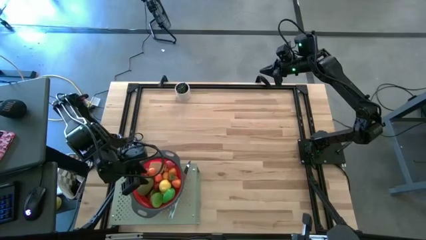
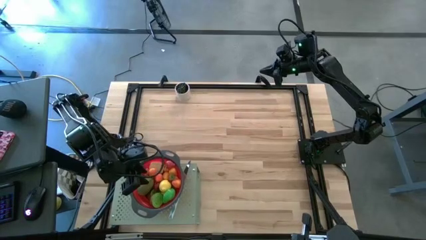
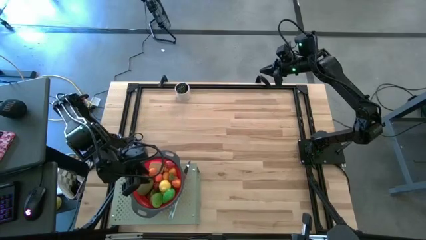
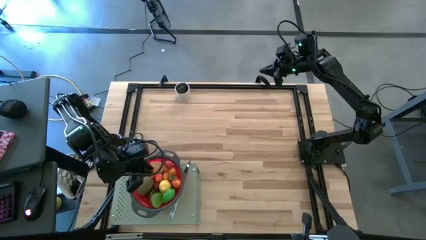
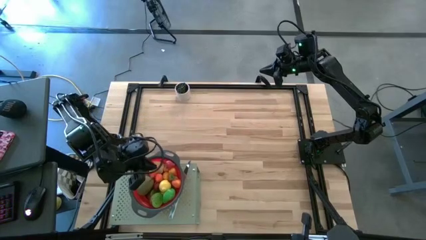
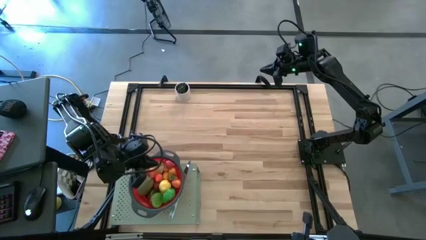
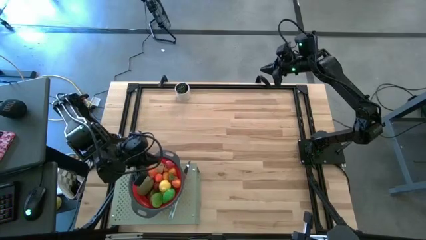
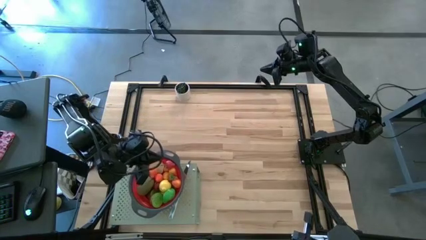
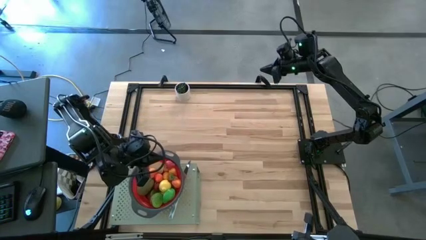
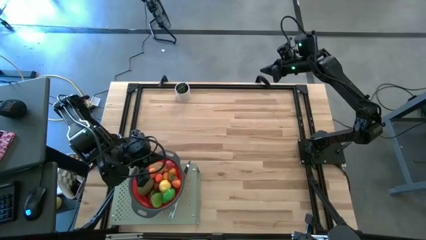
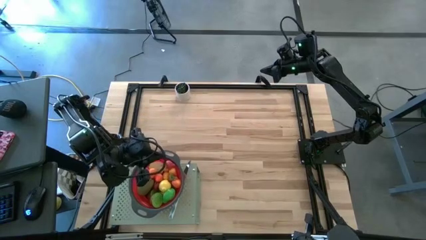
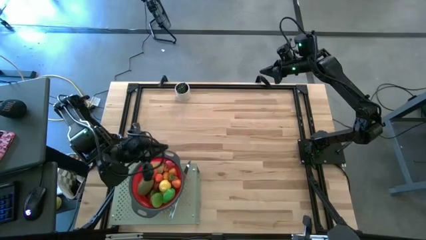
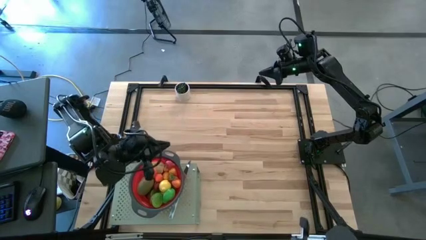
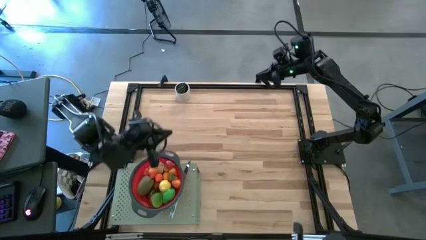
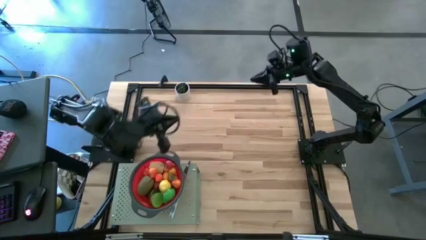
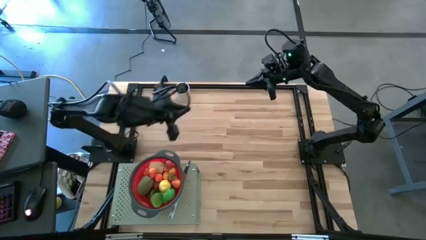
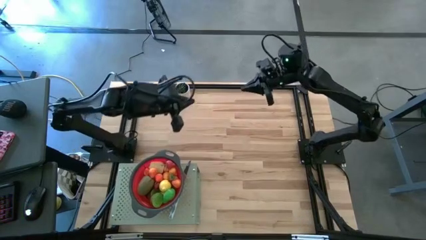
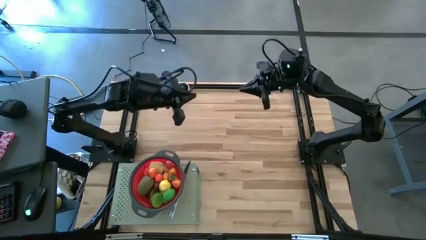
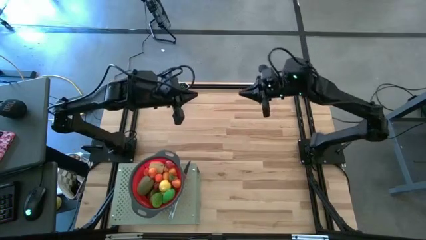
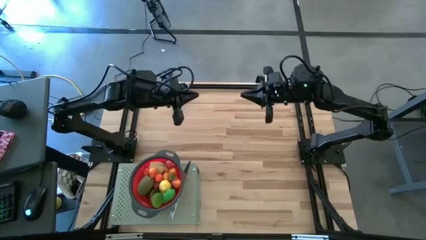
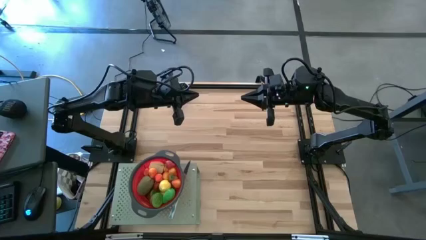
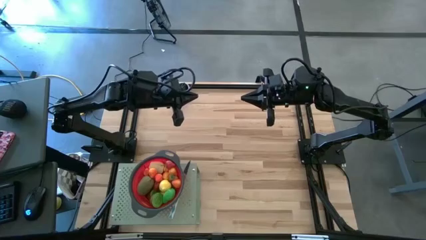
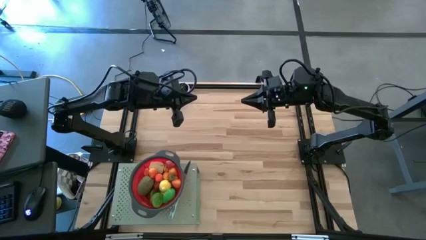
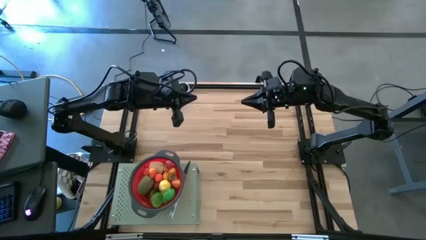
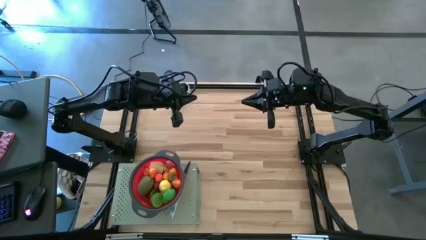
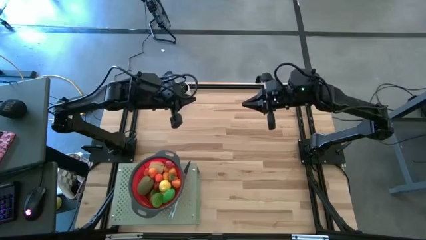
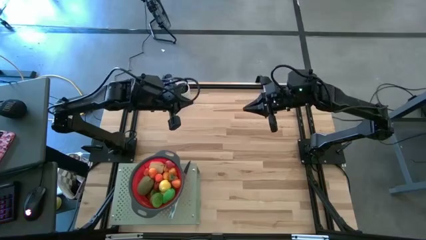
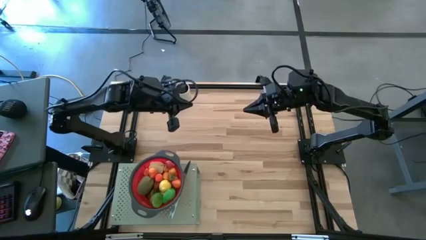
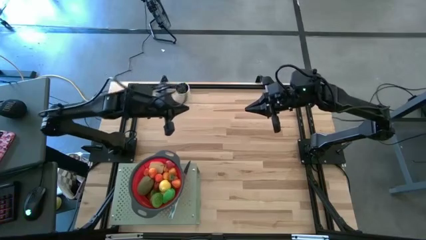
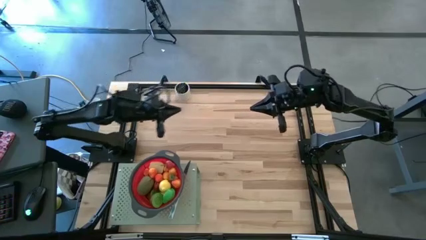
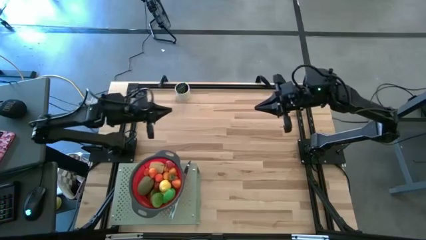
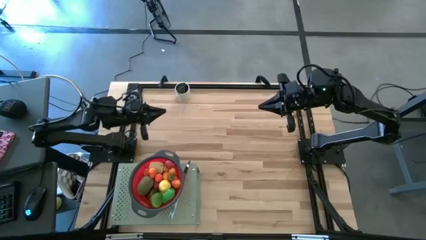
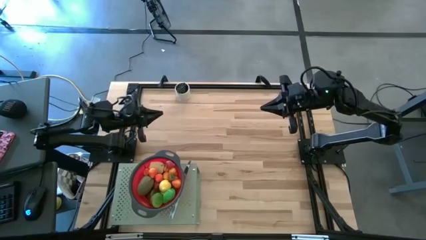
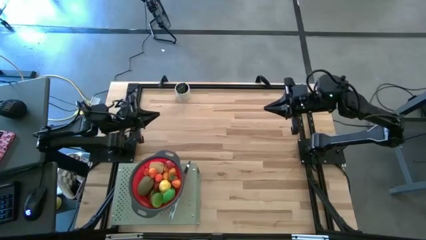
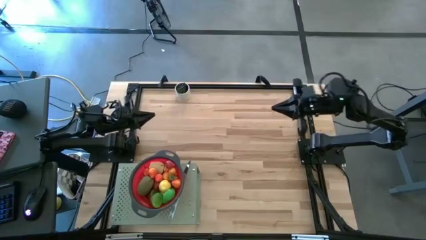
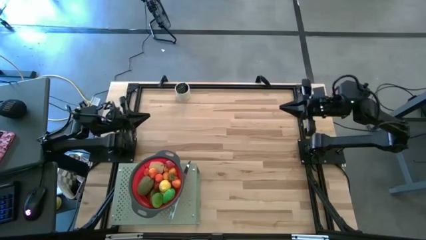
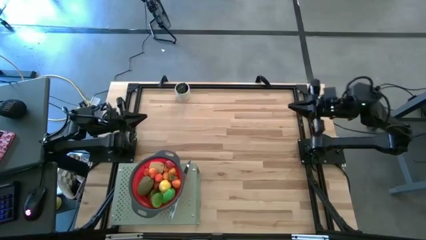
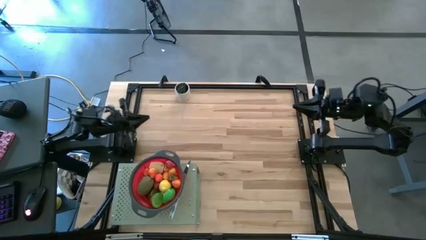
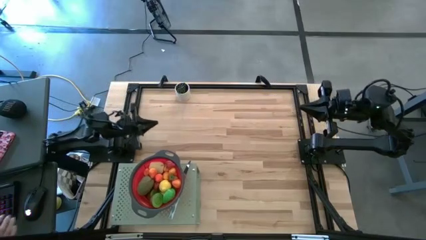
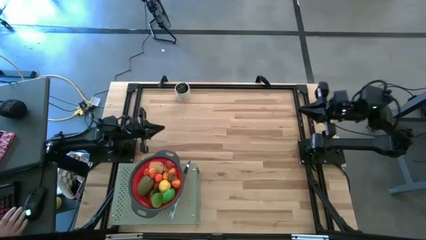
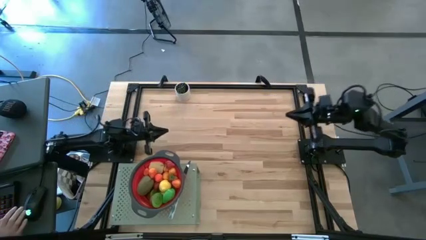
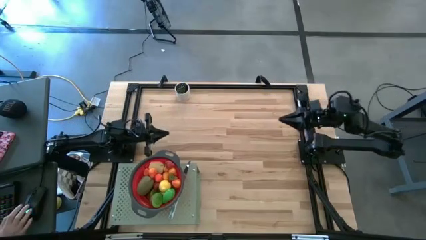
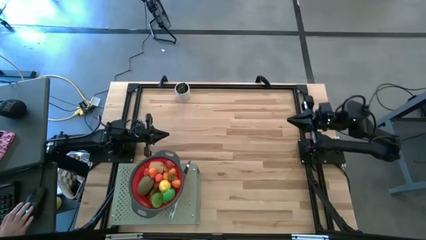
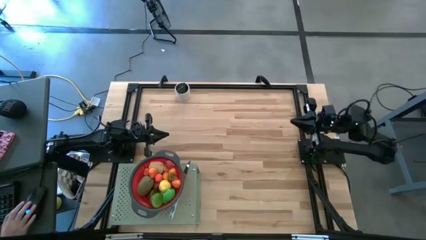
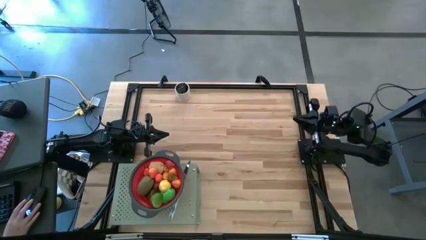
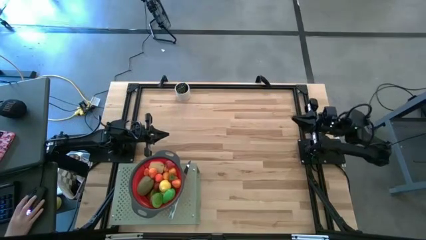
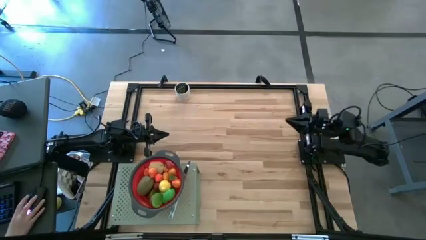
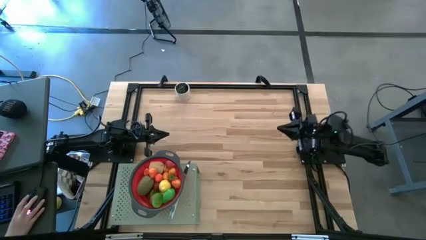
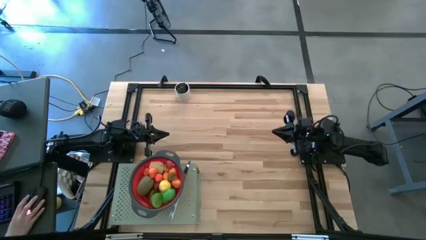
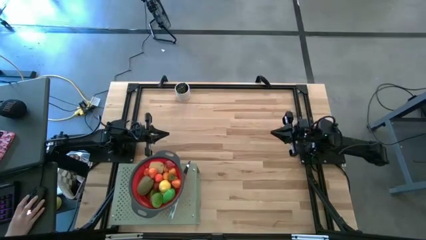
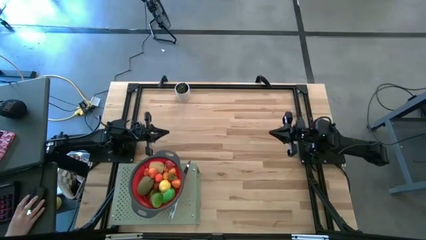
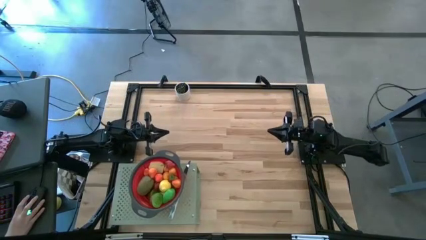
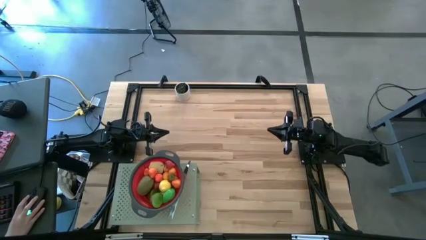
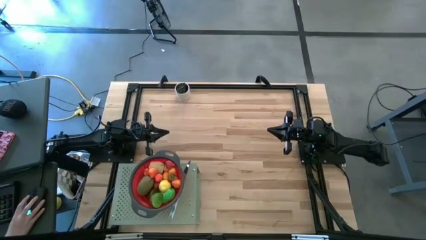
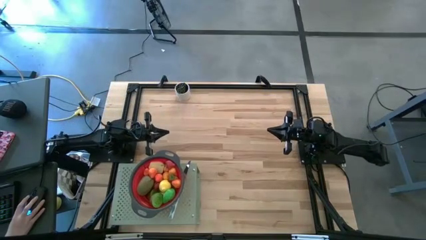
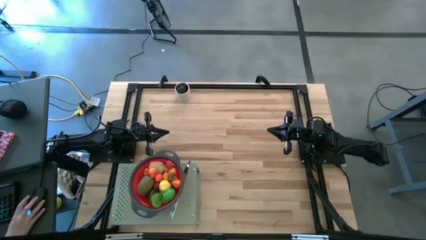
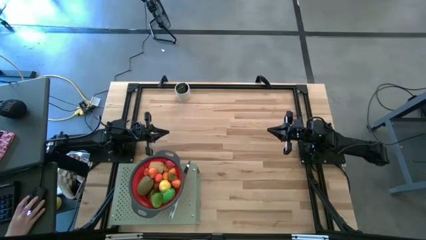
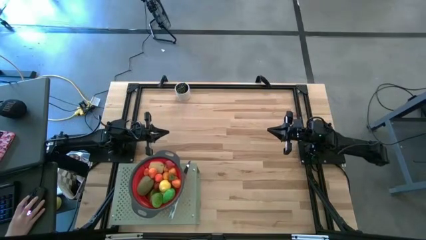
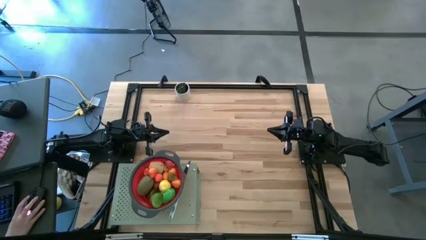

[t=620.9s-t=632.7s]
Task: Pick & Place Fruit
Return to Home Position

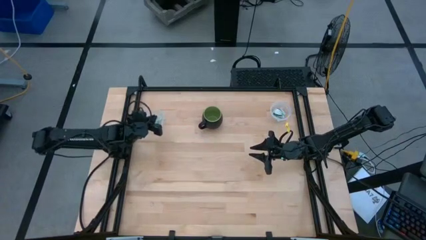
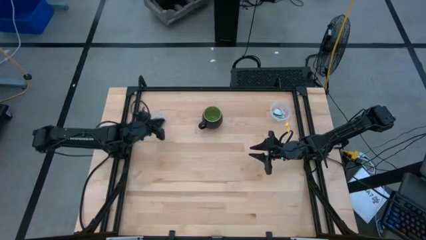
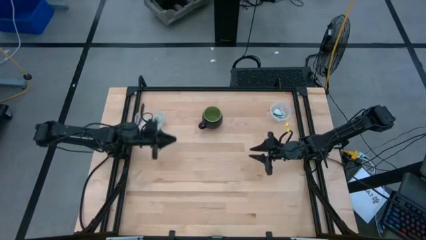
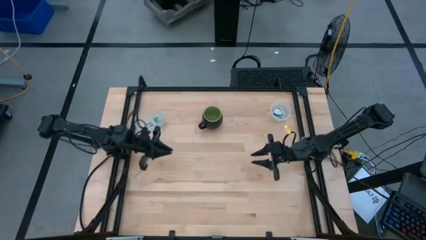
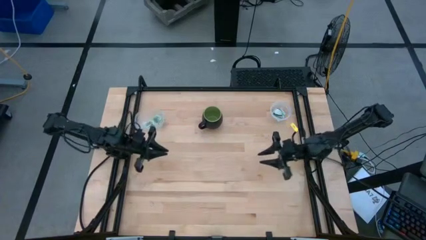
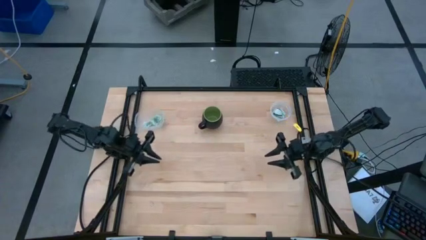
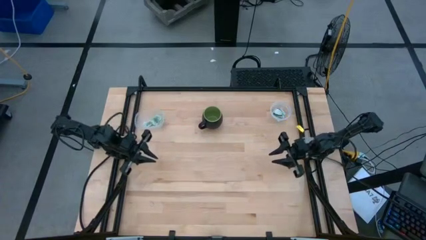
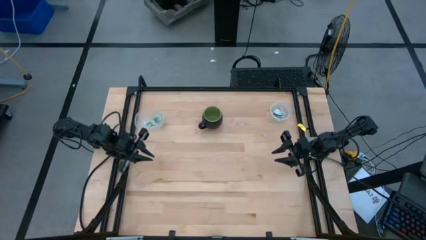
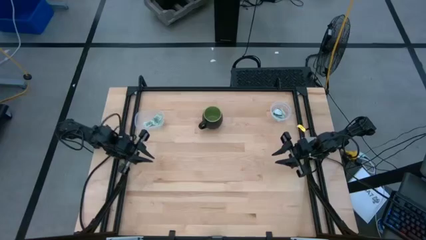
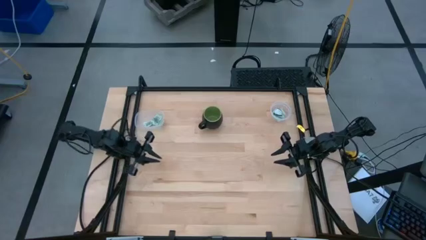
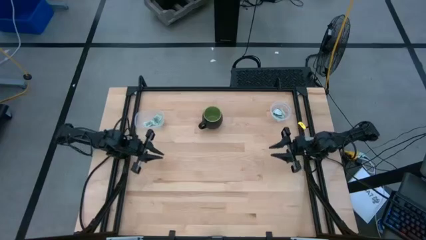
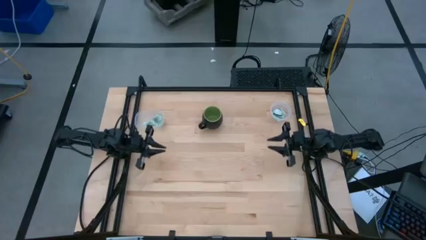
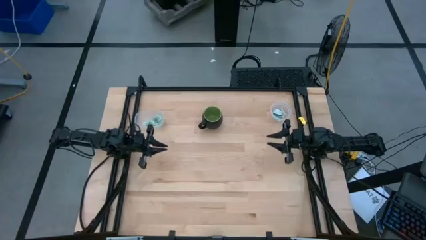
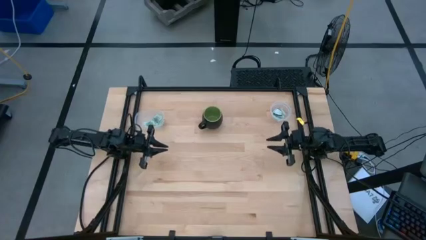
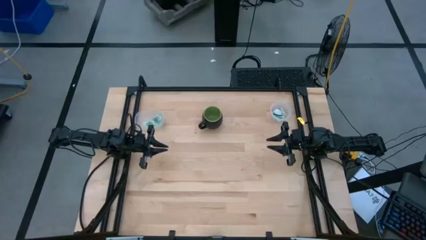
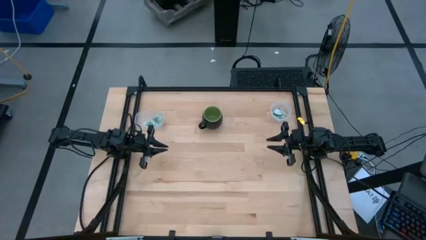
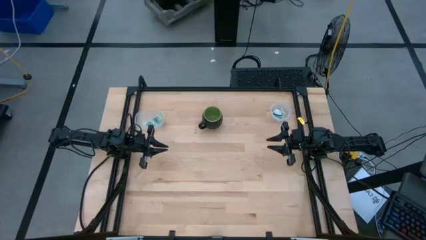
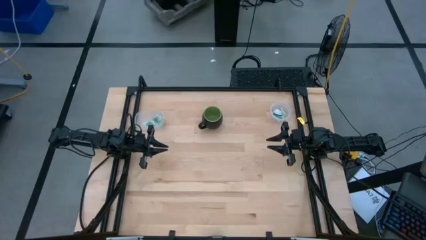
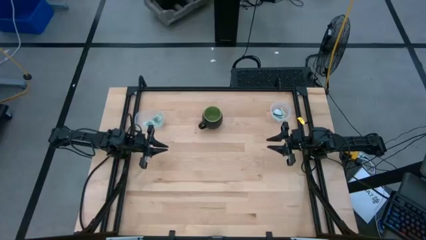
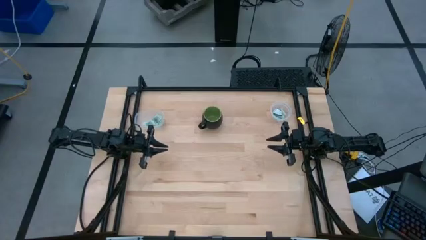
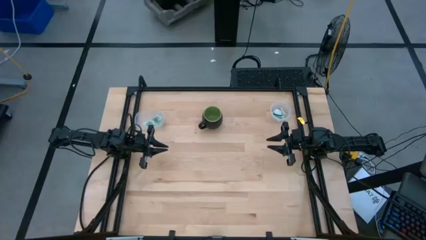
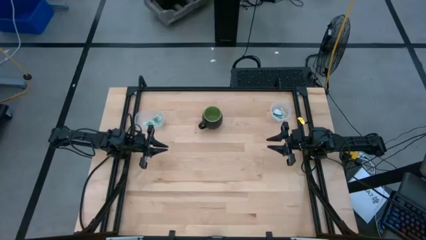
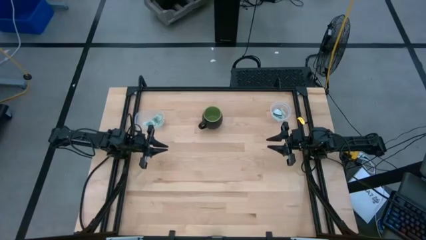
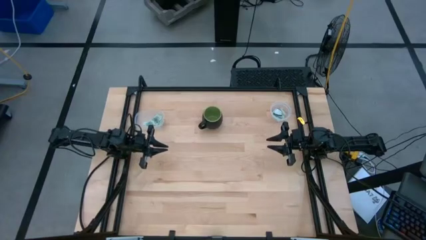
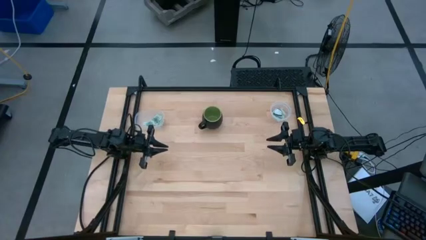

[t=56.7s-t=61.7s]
Task: Pick and place items into bin
Return to Home Position
